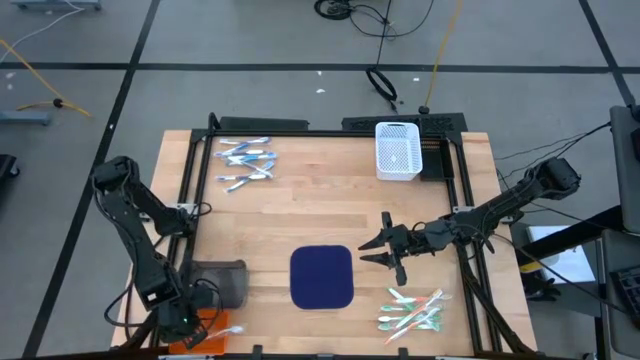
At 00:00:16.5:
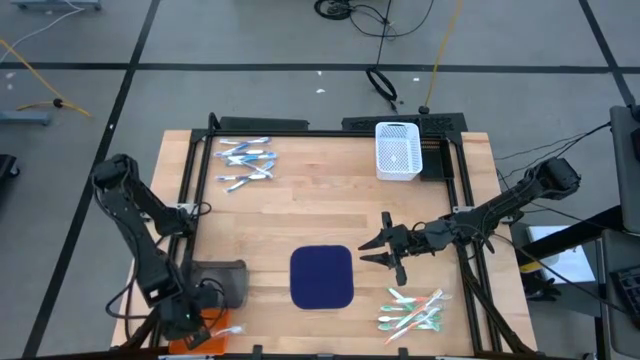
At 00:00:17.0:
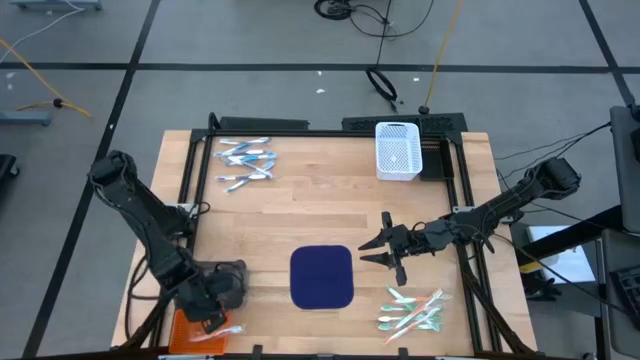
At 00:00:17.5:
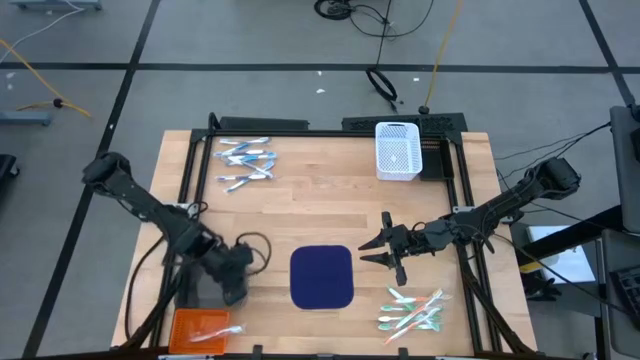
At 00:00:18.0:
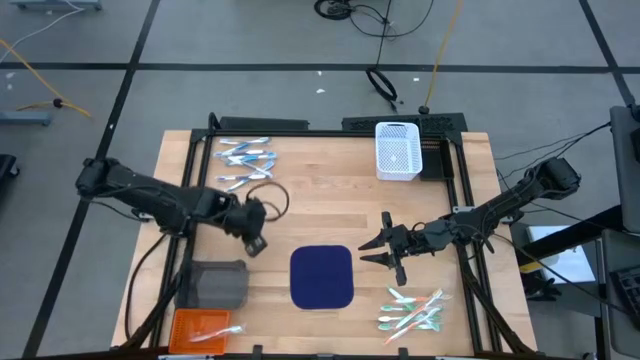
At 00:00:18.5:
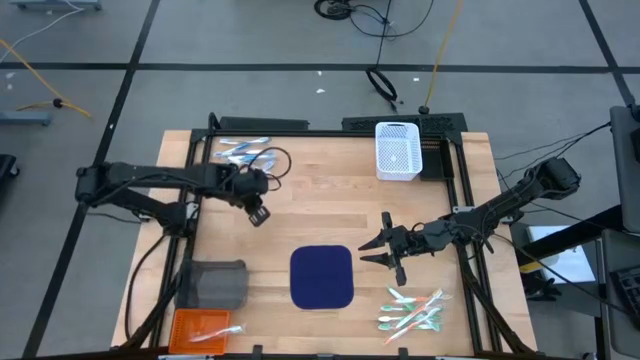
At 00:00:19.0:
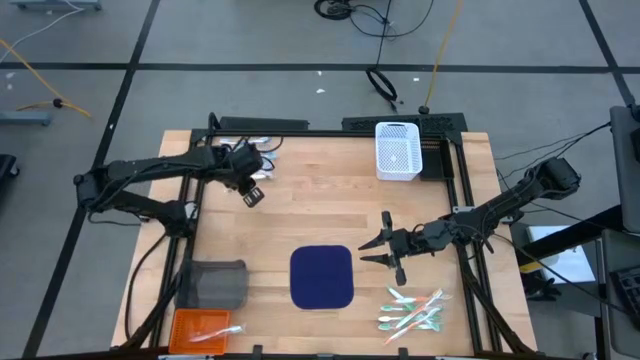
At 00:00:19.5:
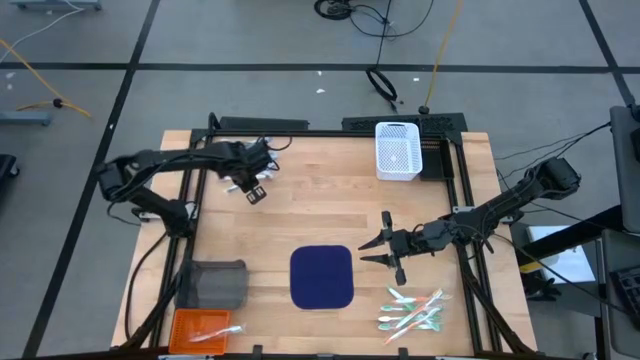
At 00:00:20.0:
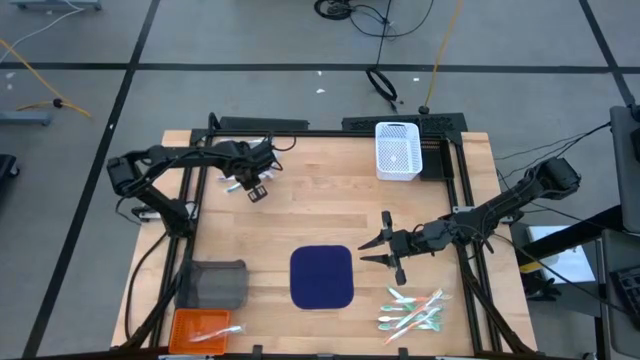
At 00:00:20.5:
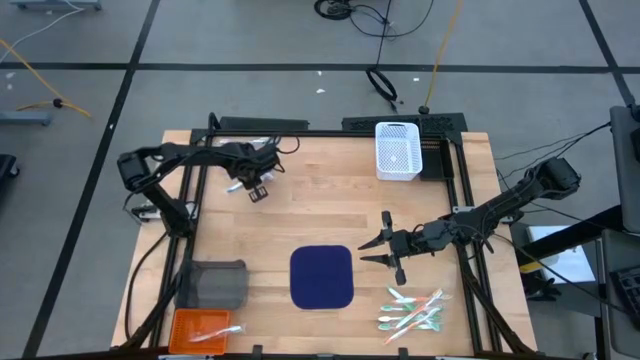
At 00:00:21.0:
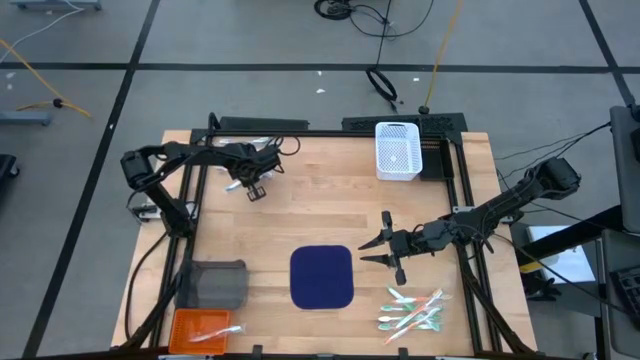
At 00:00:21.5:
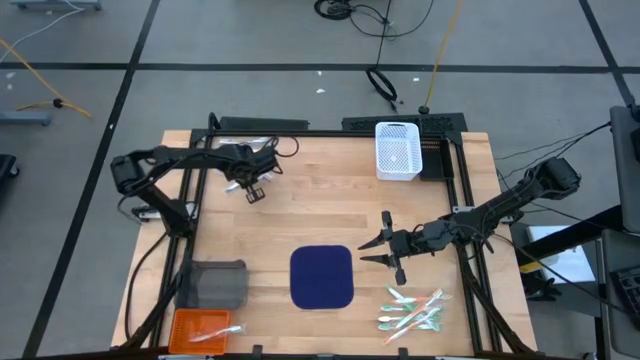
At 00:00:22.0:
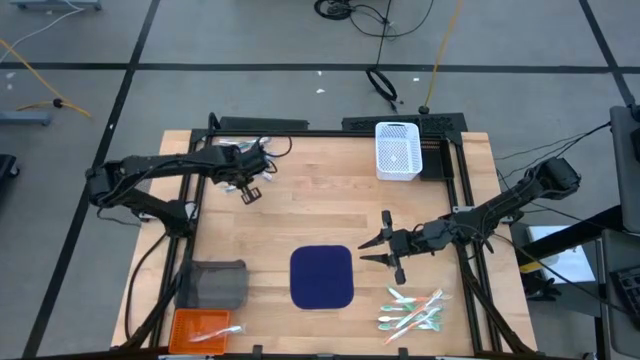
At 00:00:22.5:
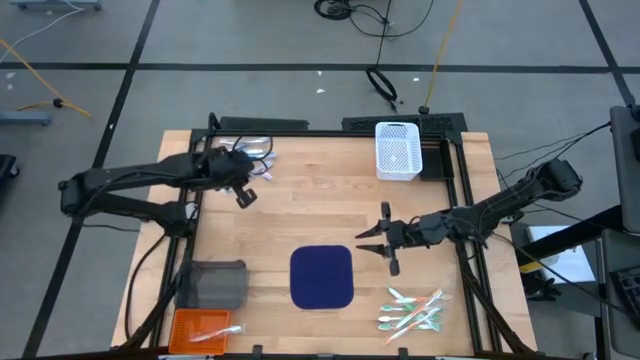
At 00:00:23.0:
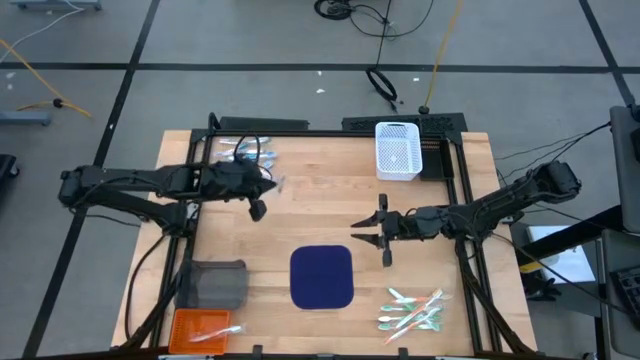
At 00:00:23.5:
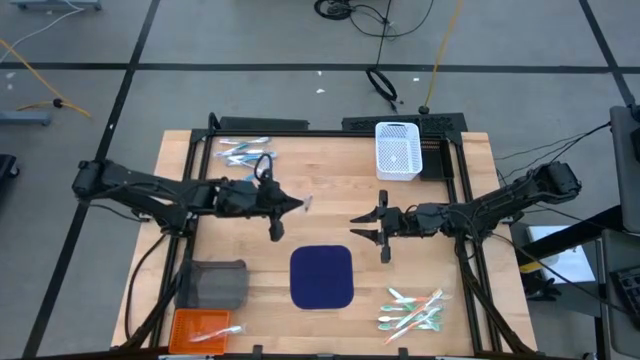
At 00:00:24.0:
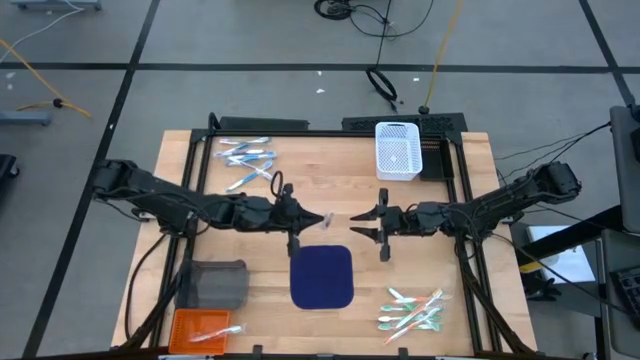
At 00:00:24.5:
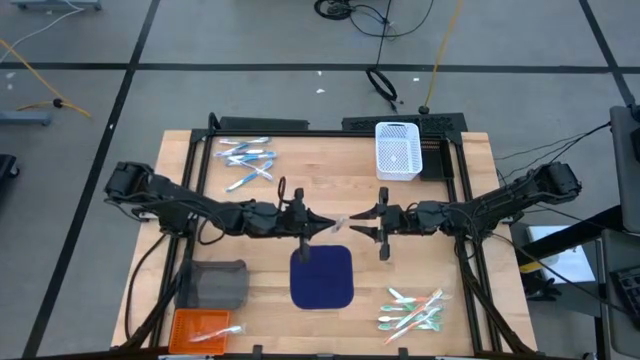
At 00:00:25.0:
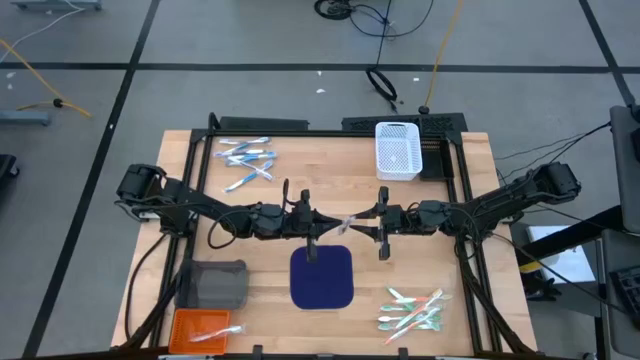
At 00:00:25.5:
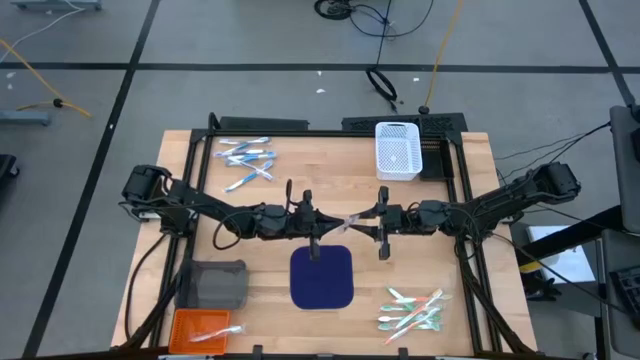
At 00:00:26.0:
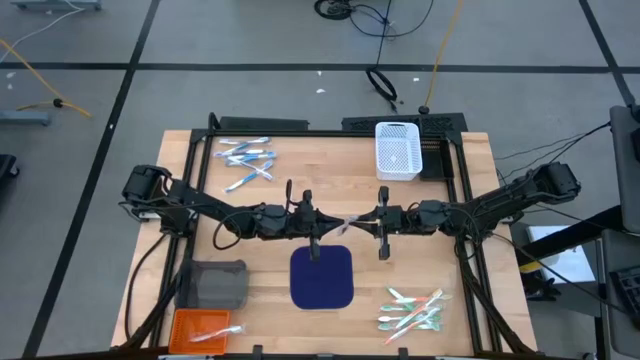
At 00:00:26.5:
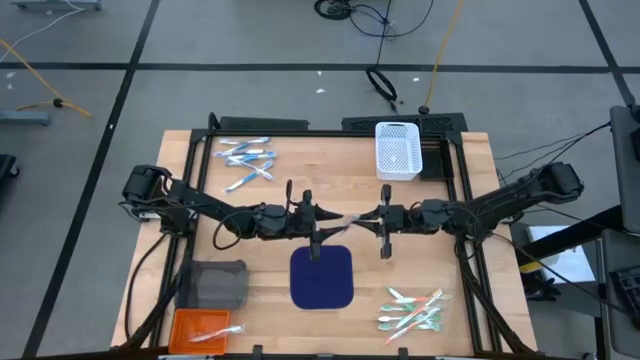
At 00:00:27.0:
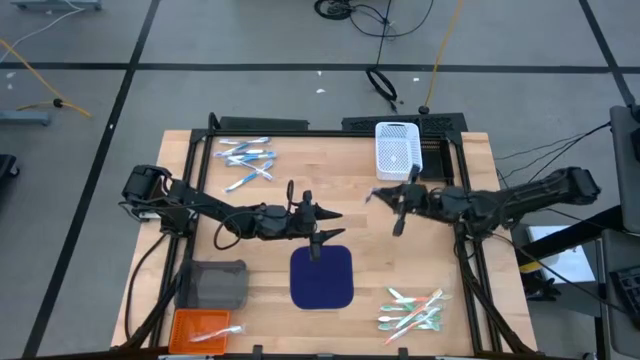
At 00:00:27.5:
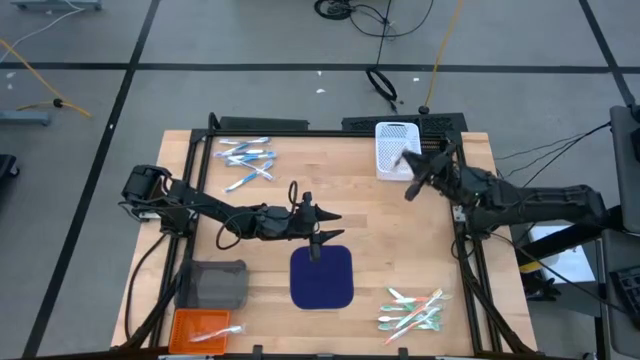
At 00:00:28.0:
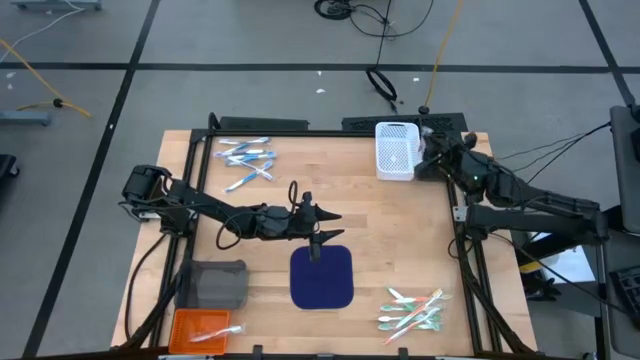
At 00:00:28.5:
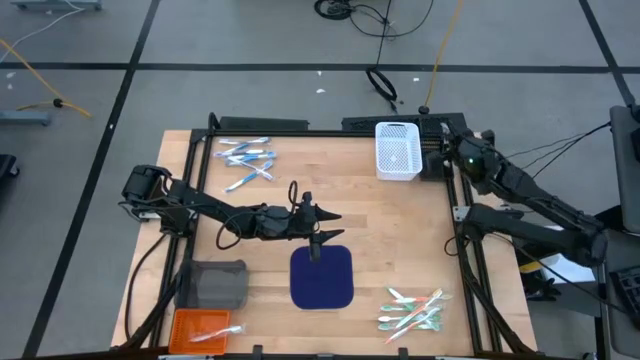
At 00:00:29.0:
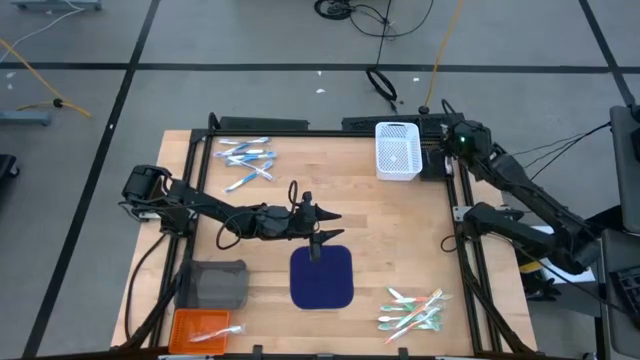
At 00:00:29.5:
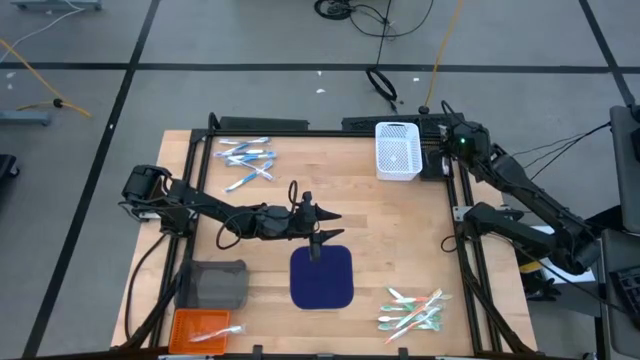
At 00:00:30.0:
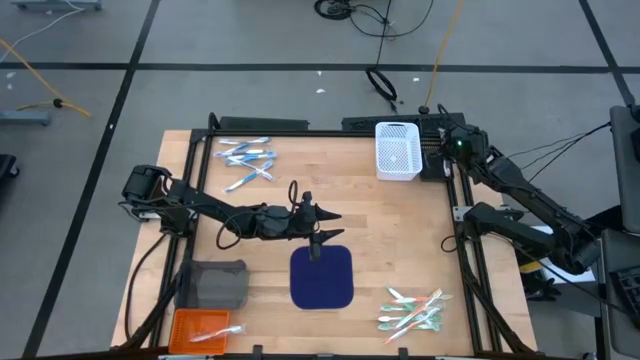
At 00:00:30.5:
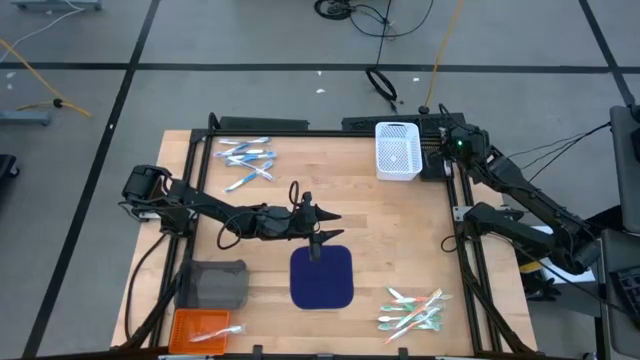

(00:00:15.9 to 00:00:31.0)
Task: Pick & Place Toothbrushes
Put the violet toothbrush into the black basket

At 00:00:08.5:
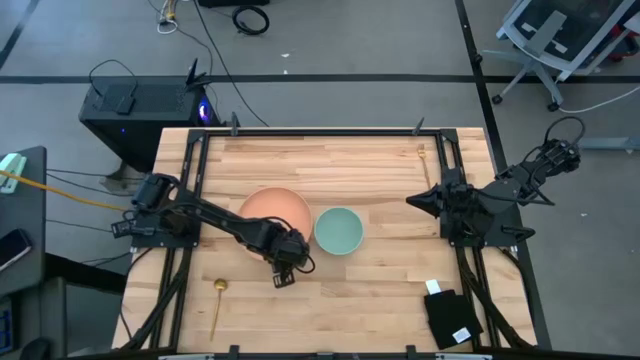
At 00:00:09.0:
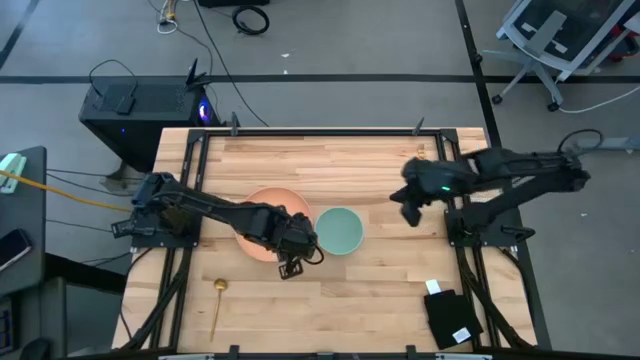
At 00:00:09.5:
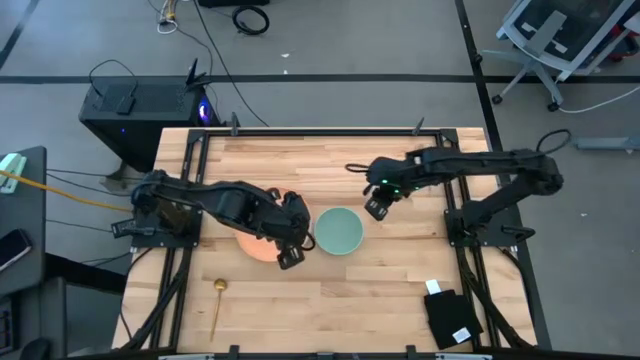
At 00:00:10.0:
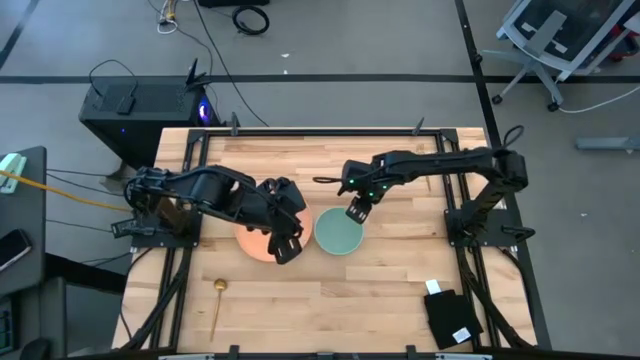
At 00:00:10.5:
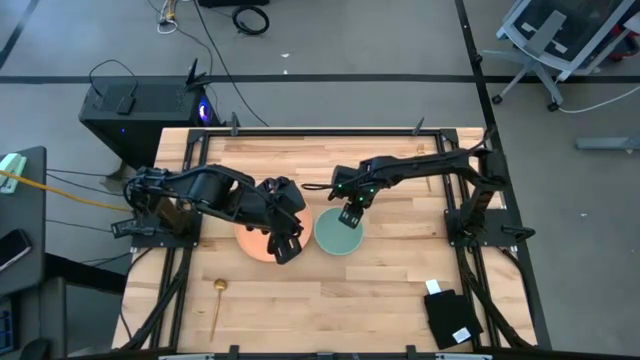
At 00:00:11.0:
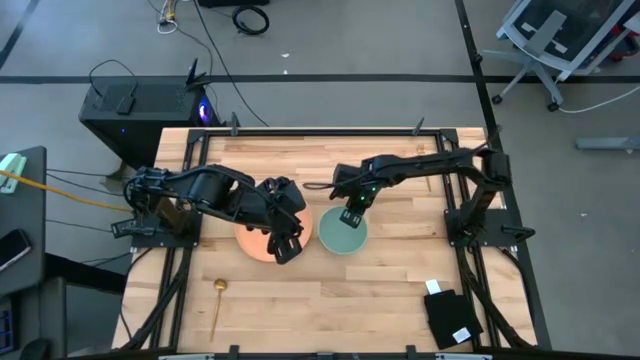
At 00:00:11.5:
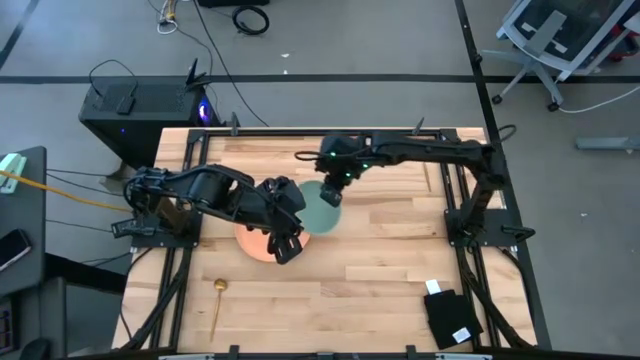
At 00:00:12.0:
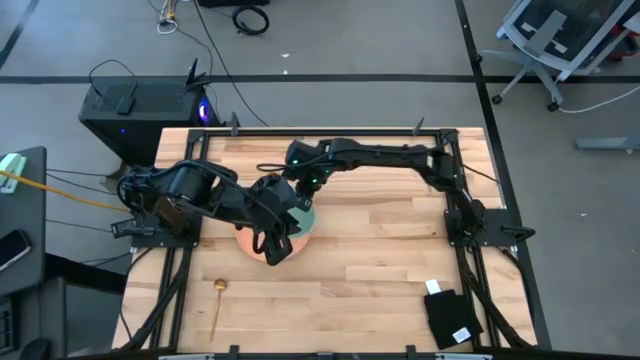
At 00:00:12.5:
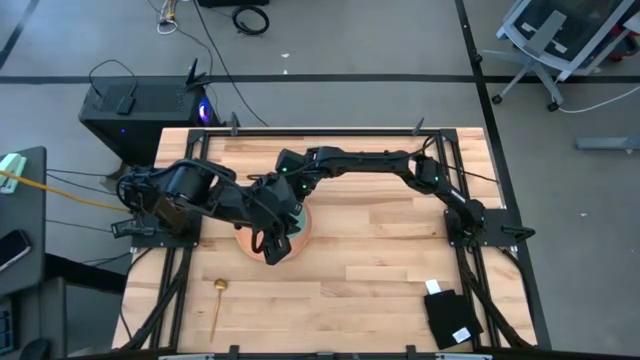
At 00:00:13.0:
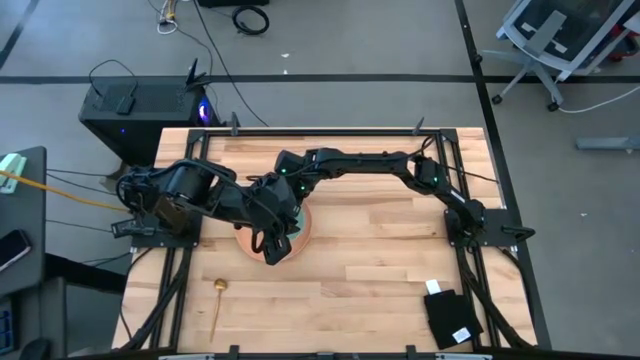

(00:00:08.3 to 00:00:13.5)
Task: Set table place
Stack the bowl on top of the plate

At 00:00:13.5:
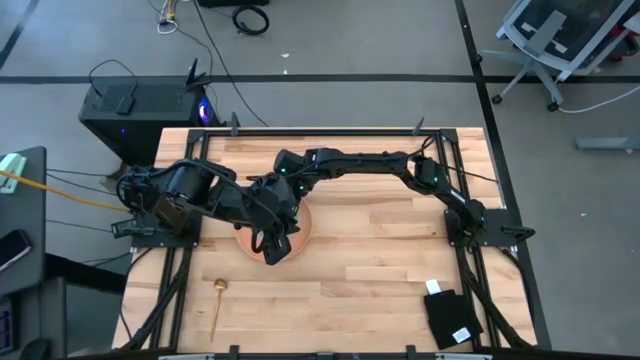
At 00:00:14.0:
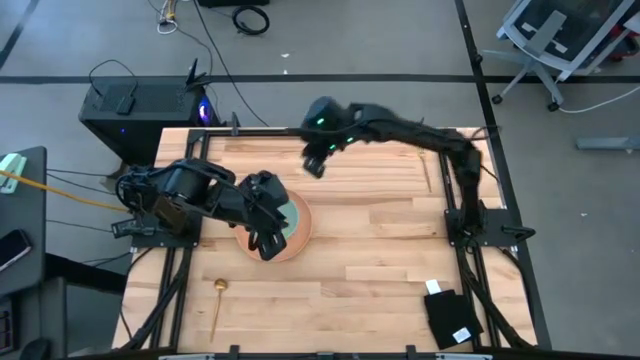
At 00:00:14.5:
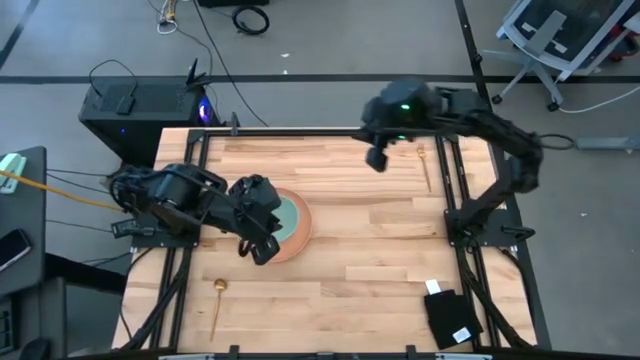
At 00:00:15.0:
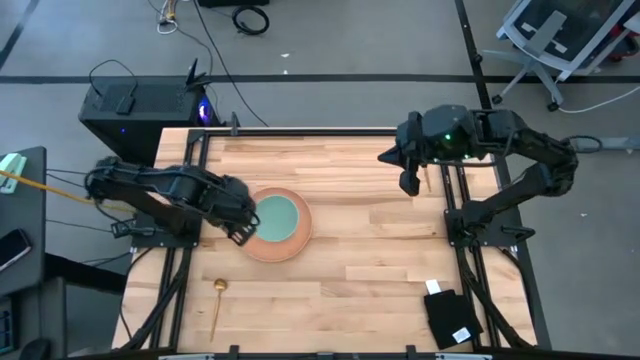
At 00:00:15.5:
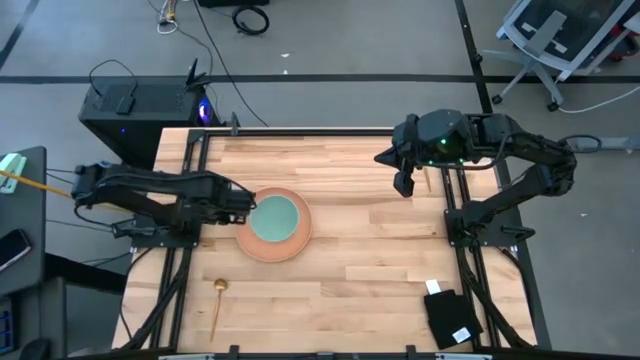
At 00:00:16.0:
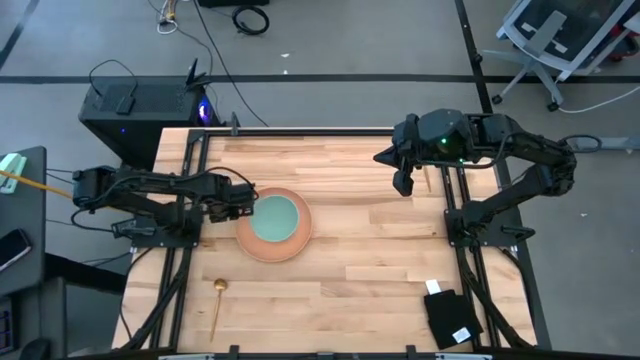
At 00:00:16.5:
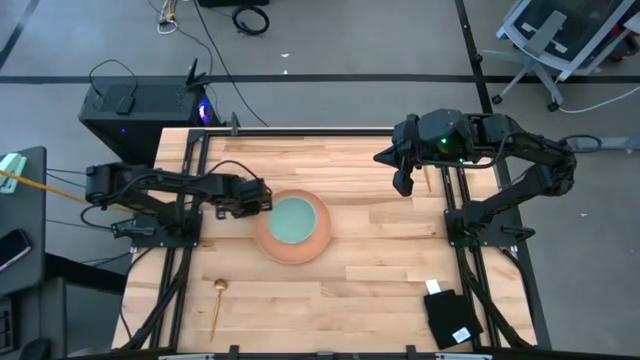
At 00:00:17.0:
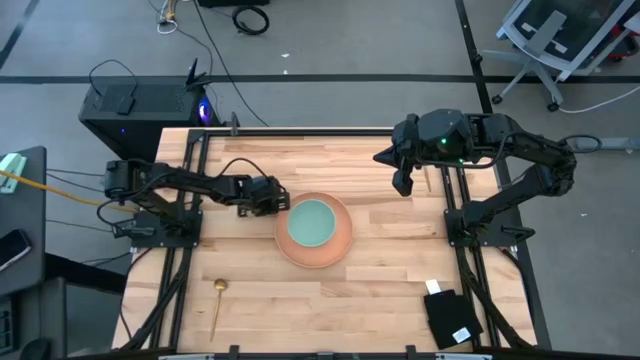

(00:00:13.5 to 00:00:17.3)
Move the plate from the middle left to the center of the table
